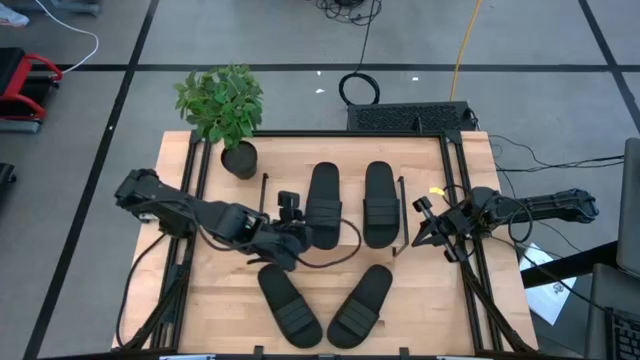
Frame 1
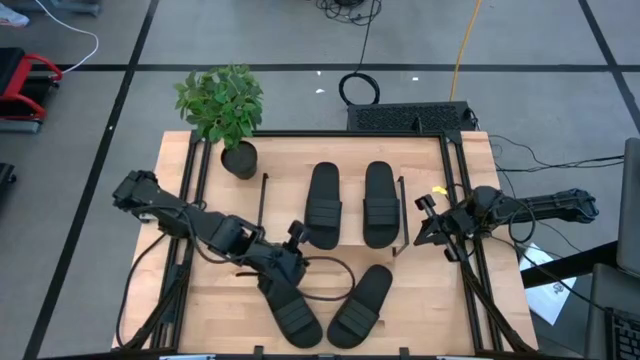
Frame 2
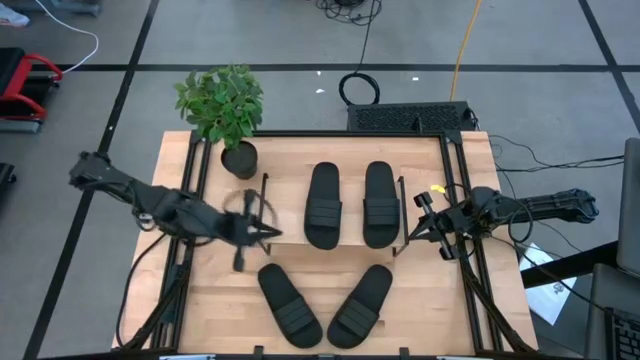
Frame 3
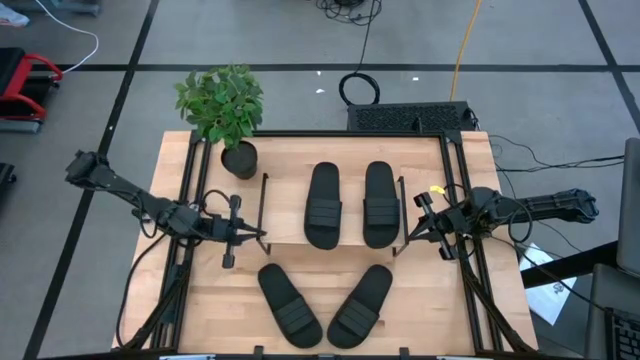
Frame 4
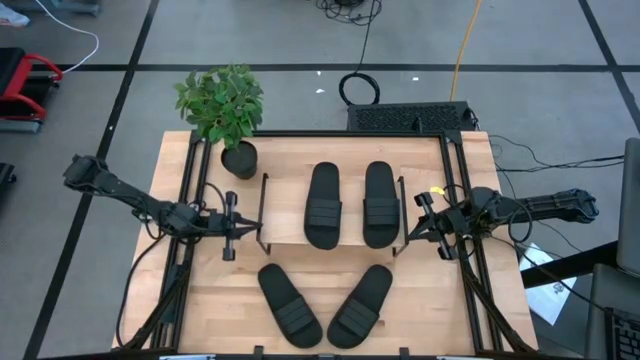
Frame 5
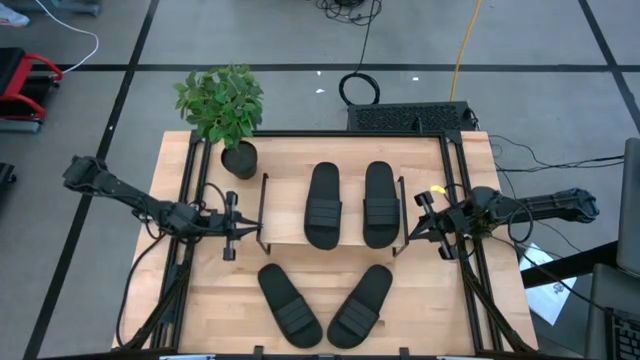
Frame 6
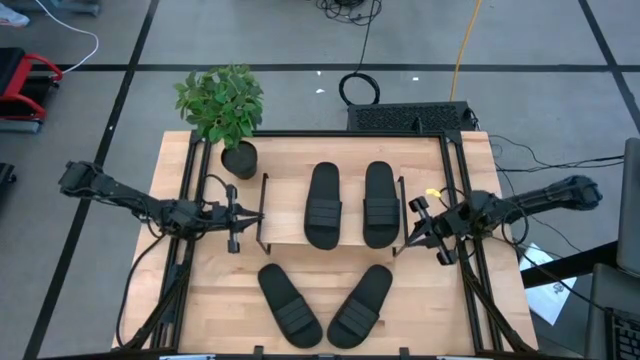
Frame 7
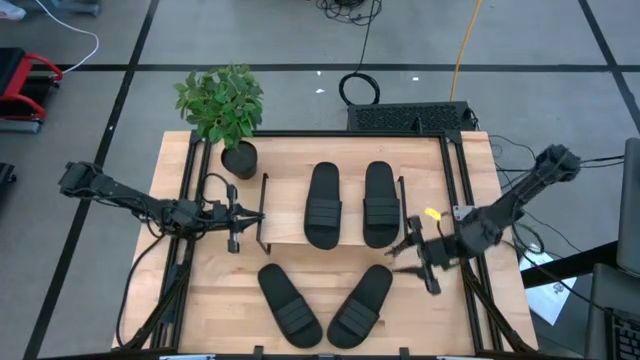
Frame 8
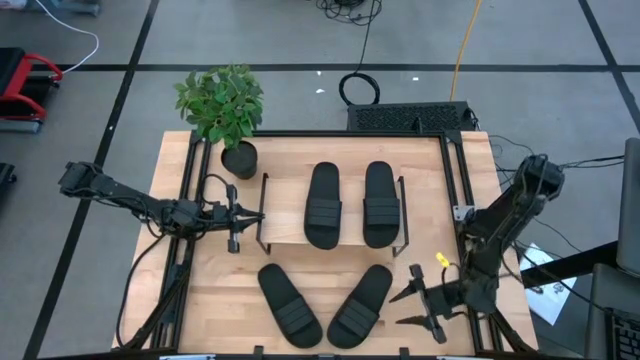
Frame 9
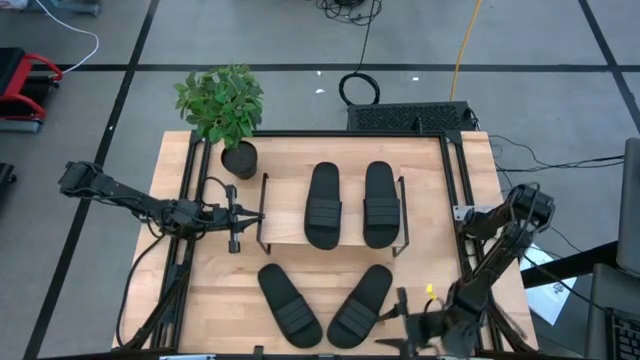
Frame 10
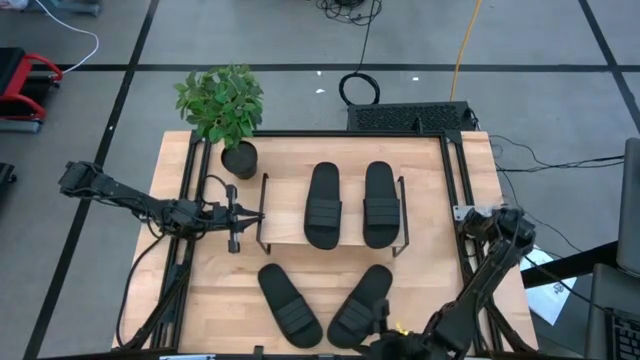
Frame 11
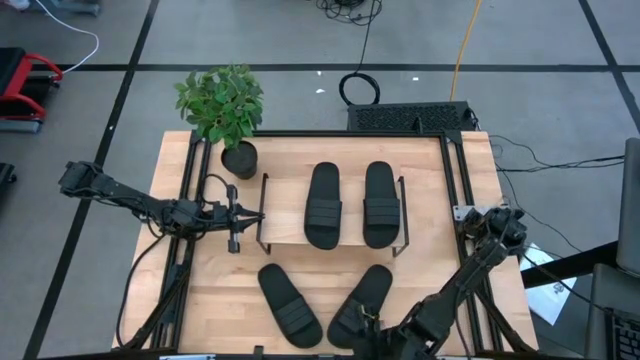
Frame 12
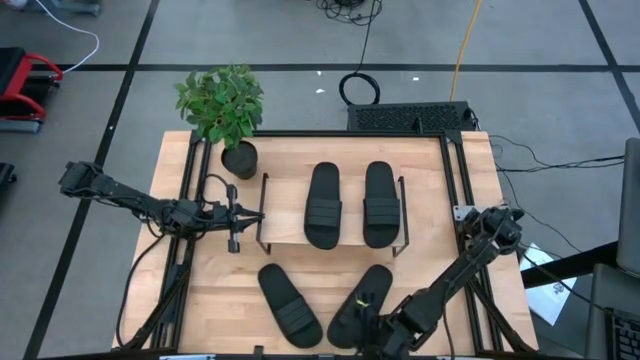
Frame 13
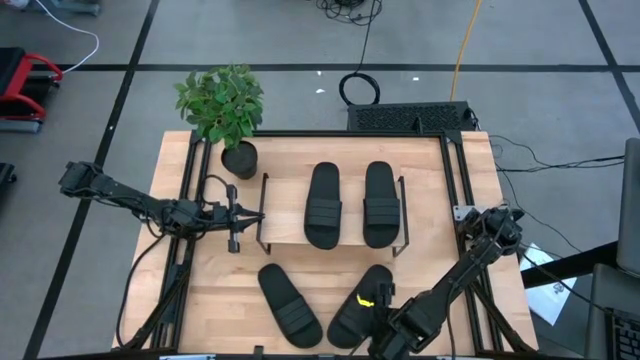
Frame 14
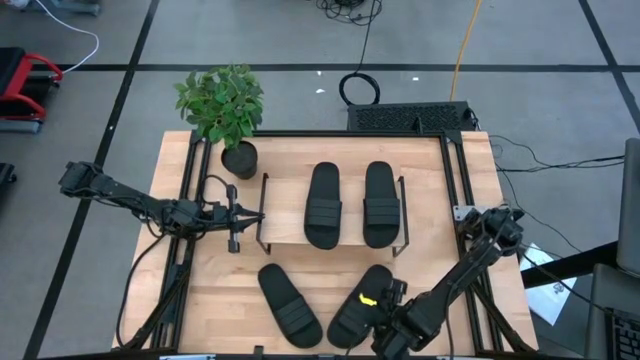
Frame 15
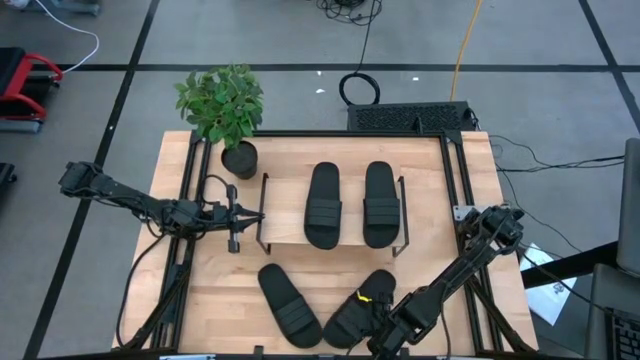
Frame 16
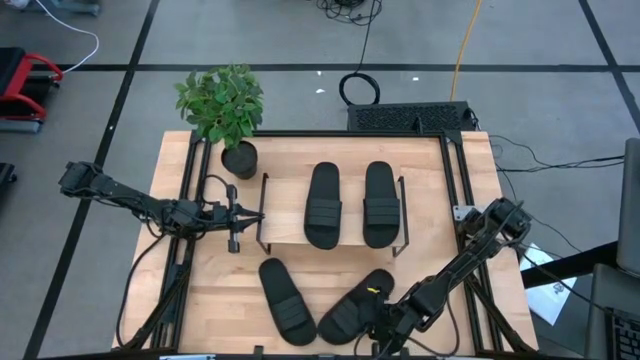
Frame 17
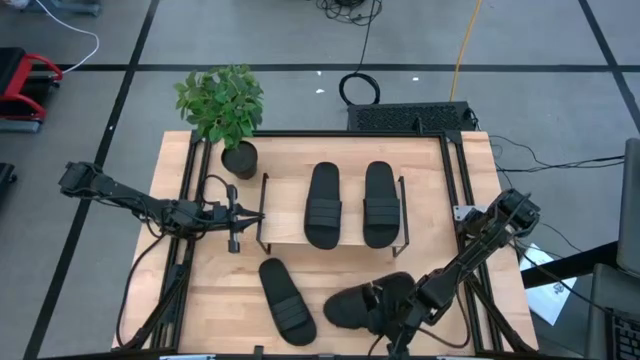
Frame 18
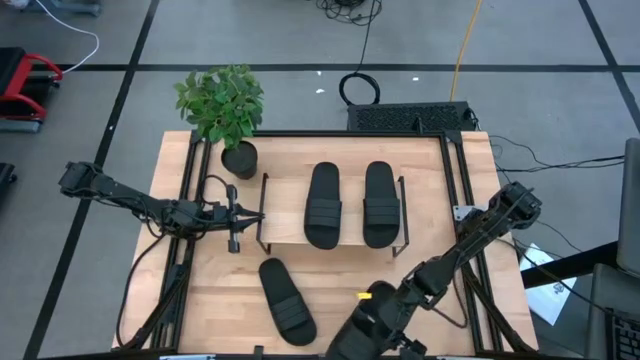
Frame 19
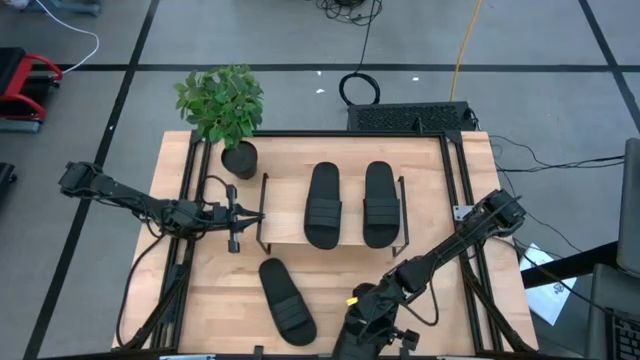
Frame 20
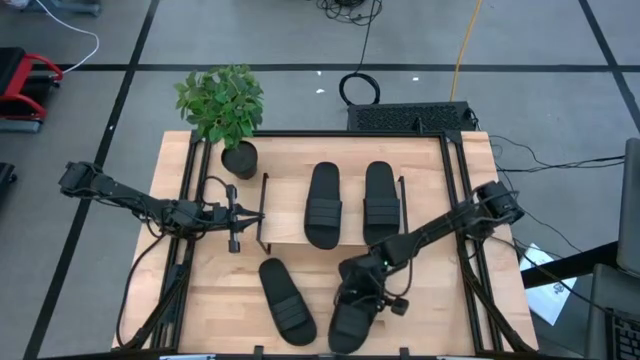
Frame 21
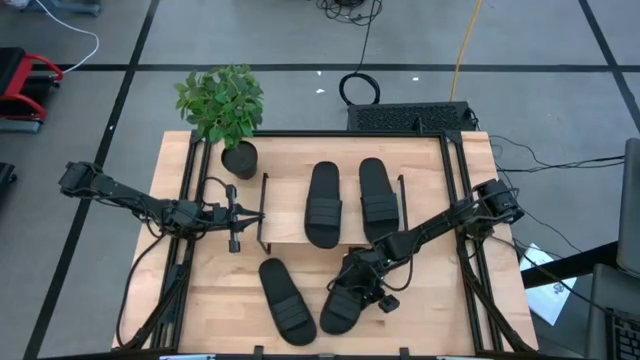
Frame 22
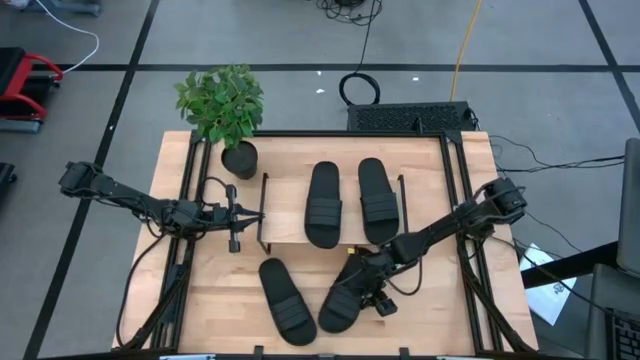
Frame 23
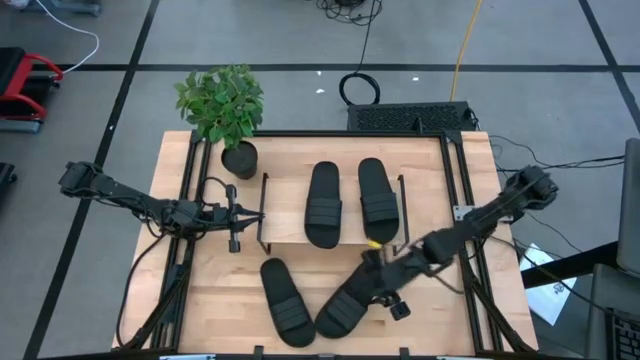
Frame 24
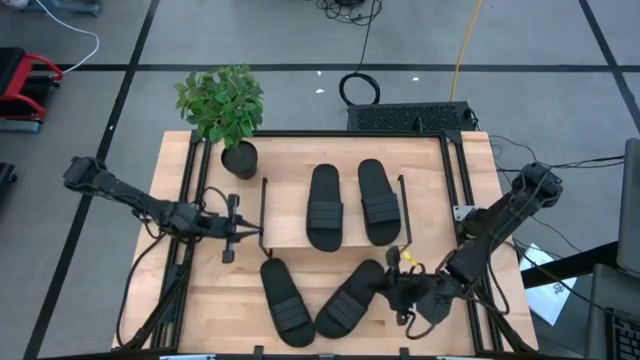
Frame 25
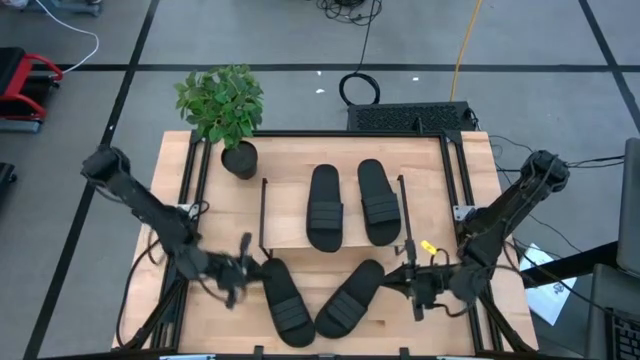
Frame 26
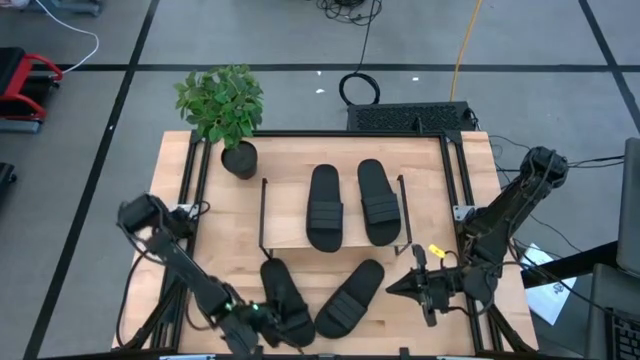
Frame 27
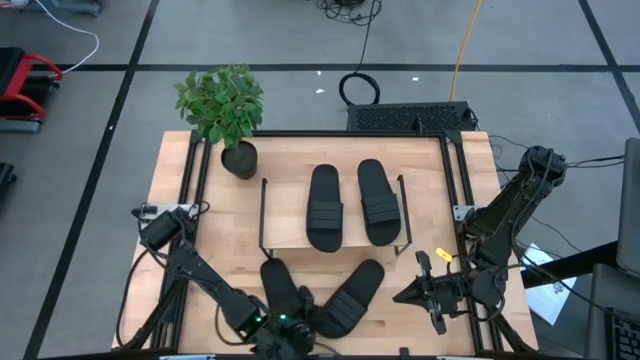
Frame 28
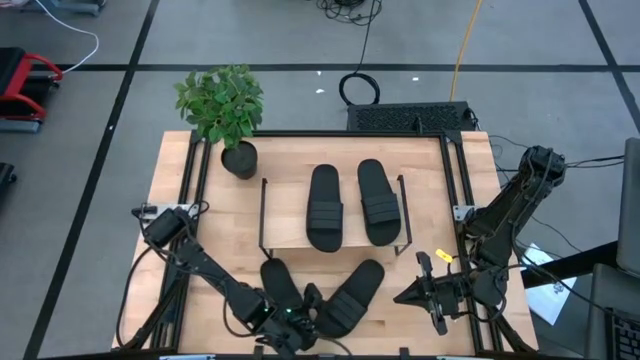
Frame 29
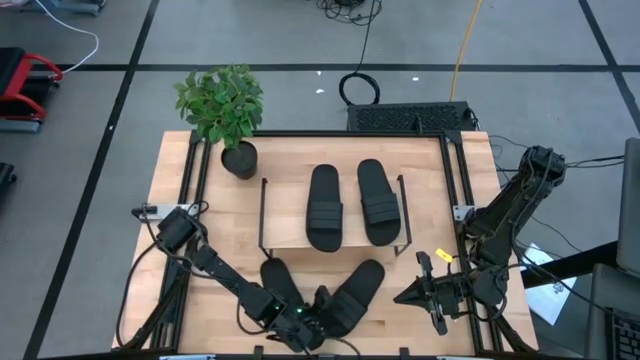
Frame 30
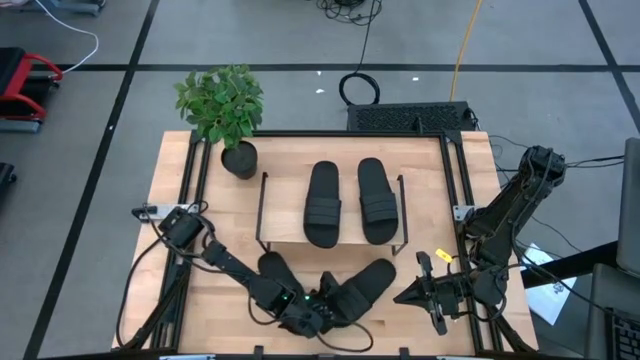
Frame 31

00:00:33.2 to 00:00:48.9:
Task: Pick and place slides into the shelf
Put the right black slide under the shelf

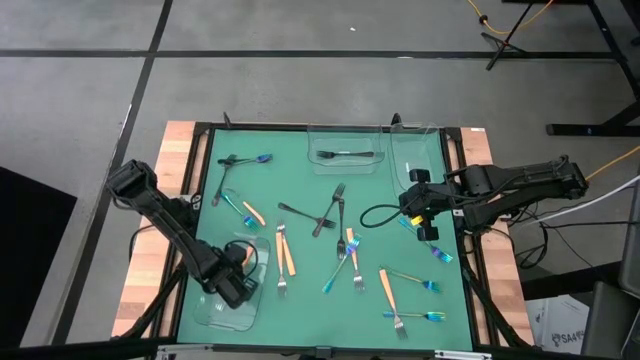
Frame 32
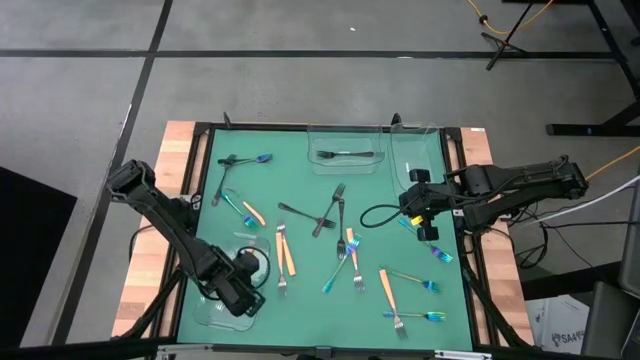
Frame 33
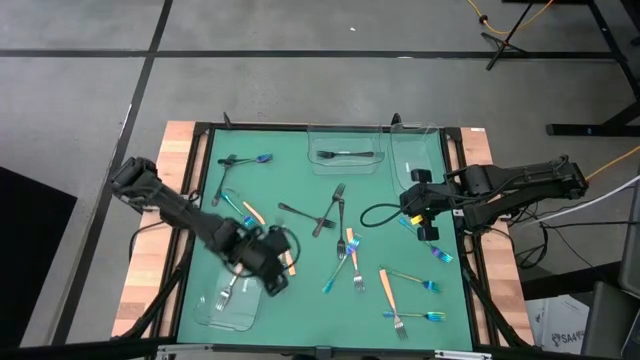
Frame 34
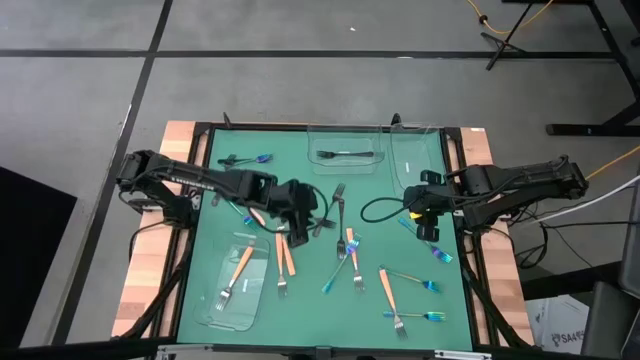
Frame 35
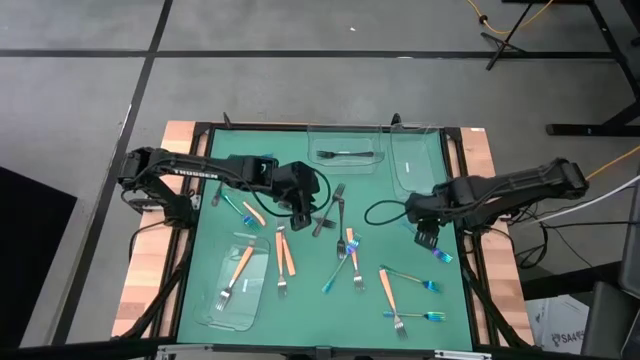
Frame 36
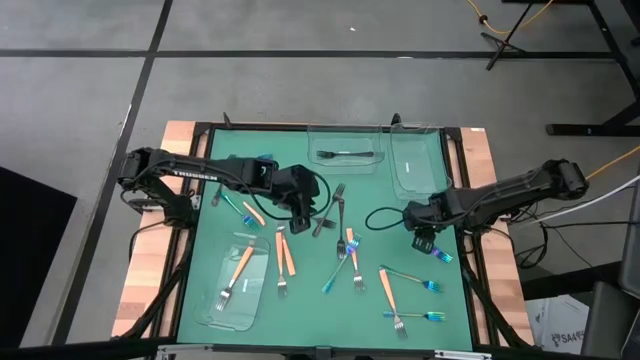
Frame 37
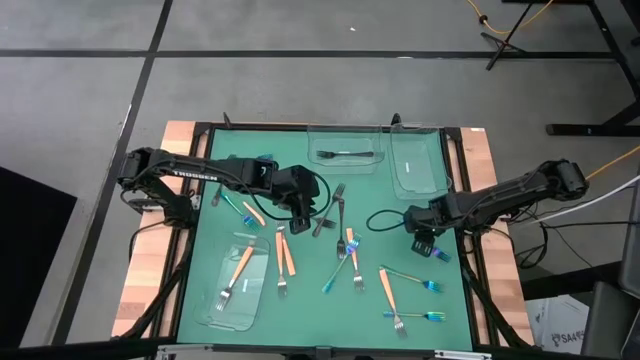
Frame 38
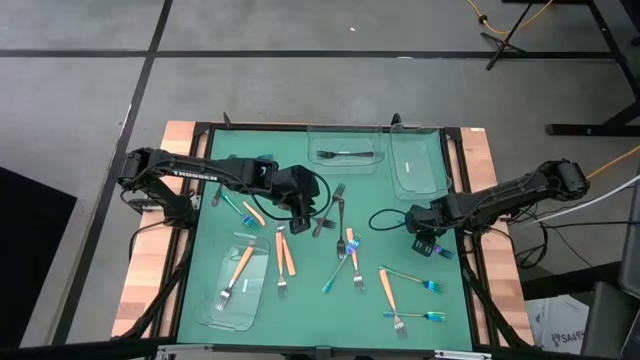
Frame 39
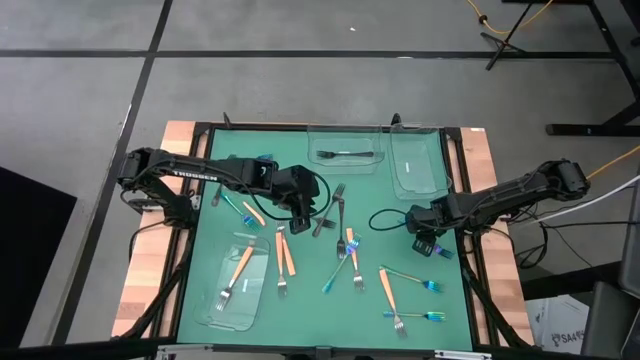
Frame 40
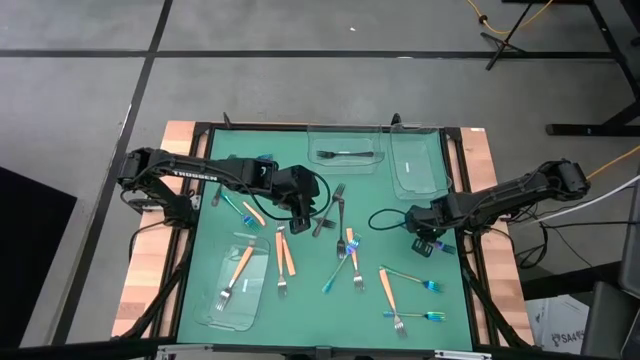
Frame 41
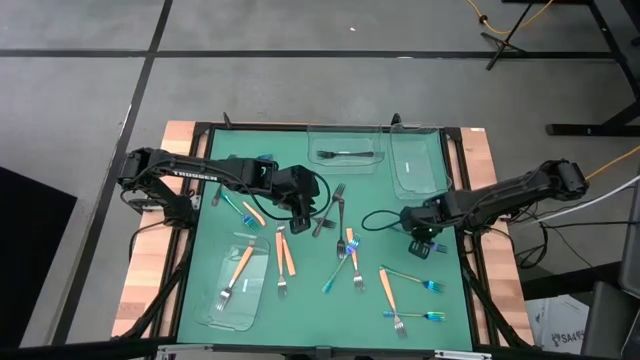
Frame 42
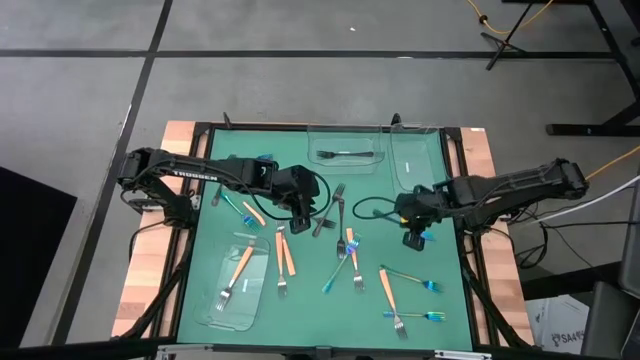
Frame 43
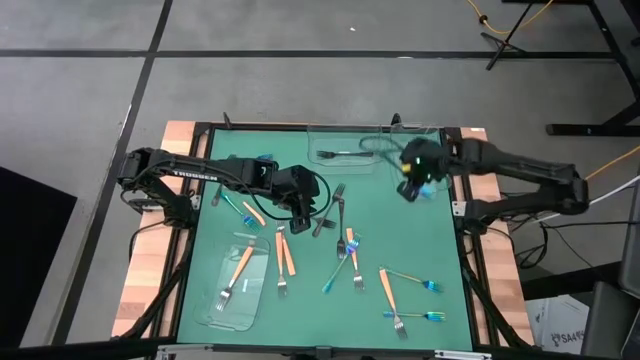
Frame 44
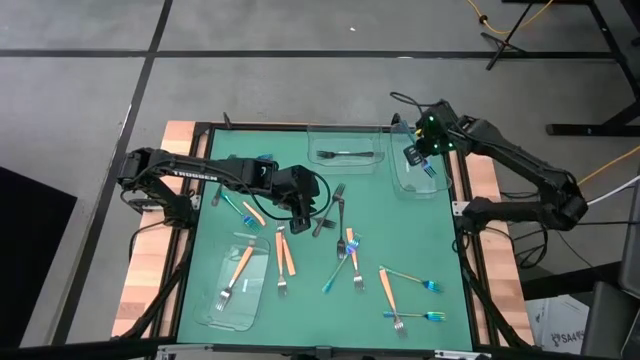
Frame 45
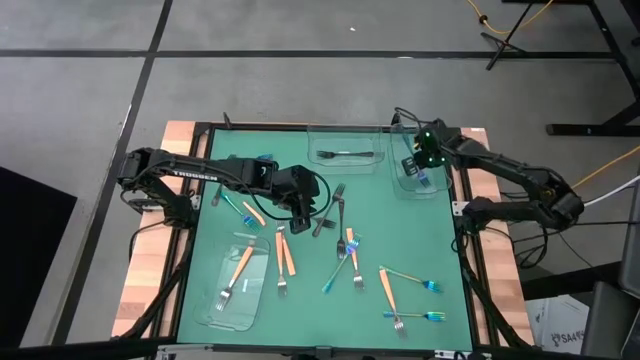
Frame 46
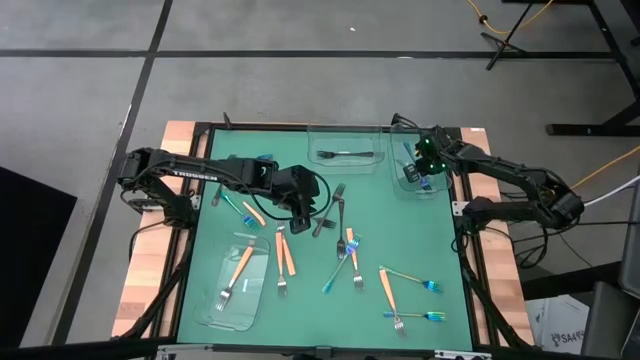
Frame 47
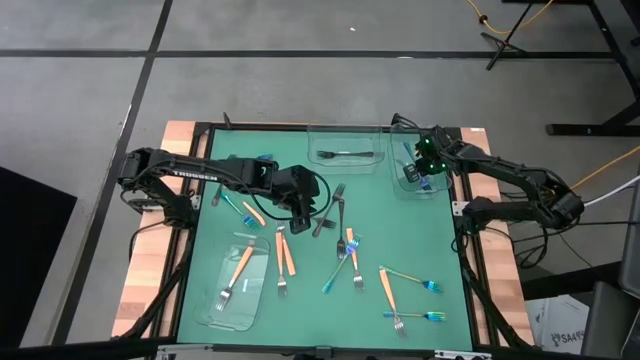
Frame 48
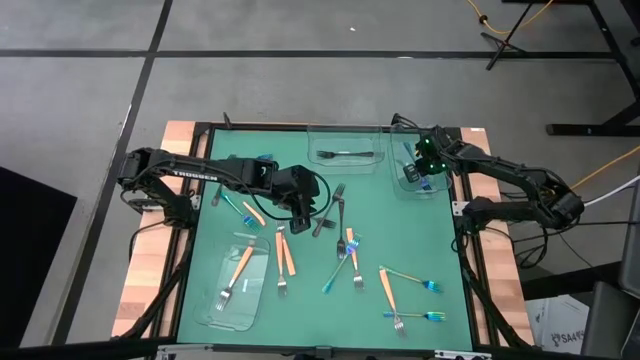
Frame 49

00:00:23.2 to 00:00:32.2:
Task: Sort silverware by color (type)
Put the blue fork into the top right transparent bin
